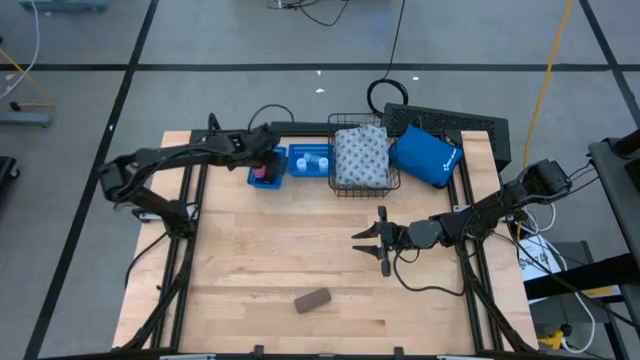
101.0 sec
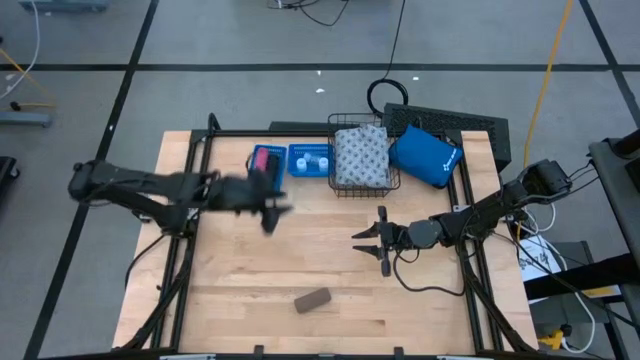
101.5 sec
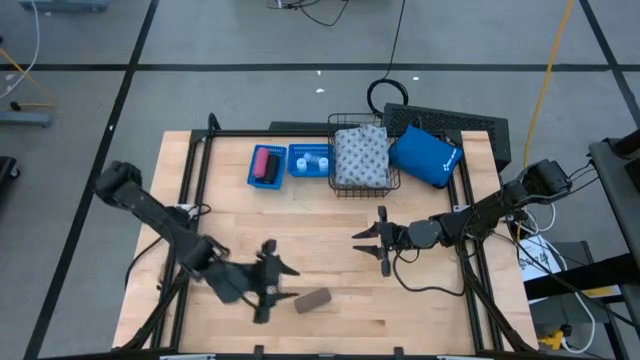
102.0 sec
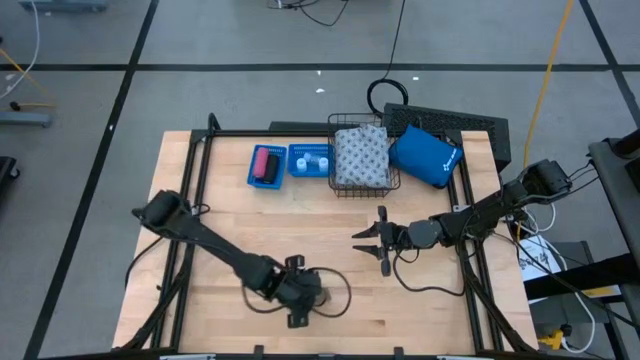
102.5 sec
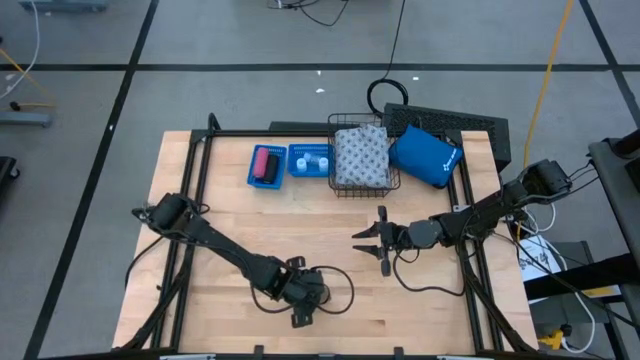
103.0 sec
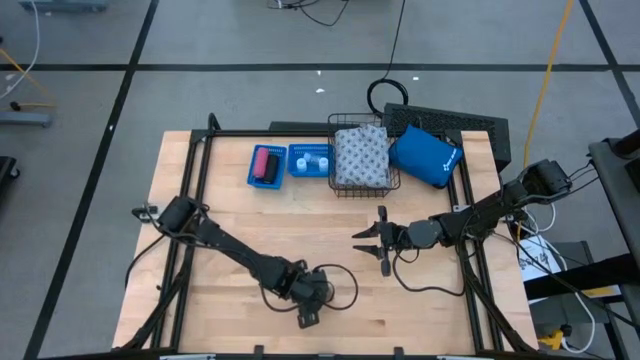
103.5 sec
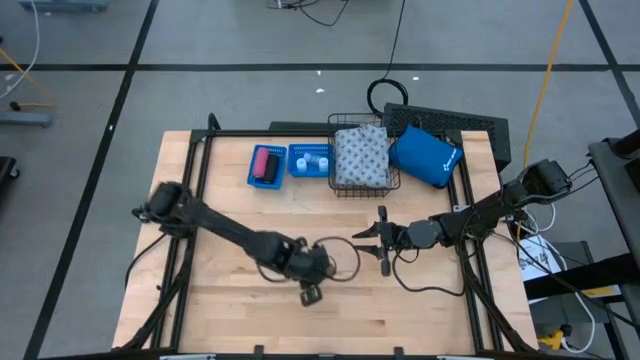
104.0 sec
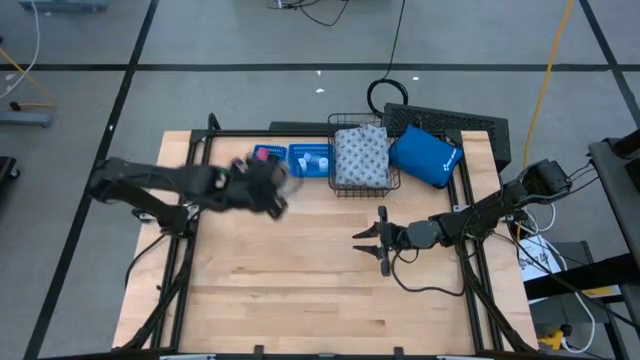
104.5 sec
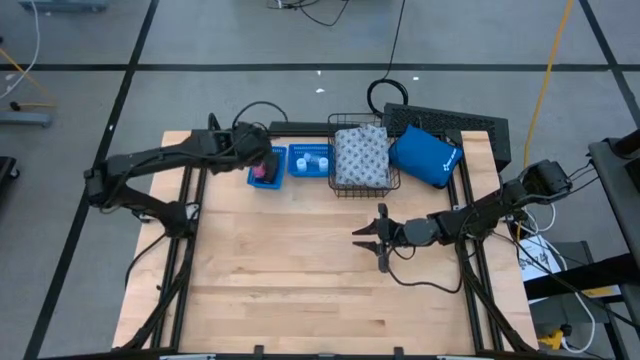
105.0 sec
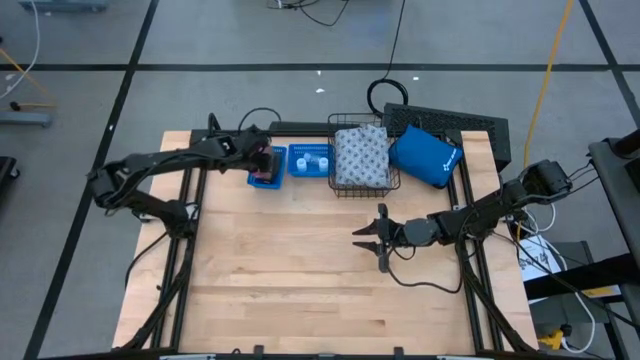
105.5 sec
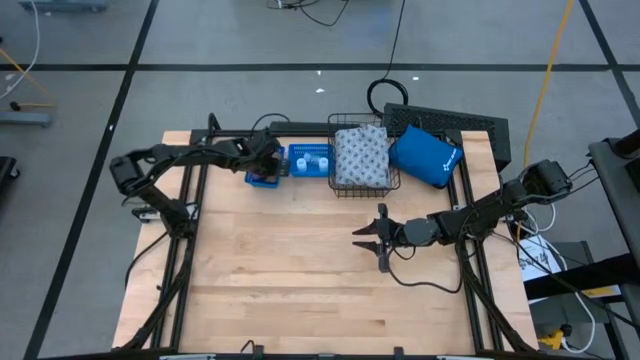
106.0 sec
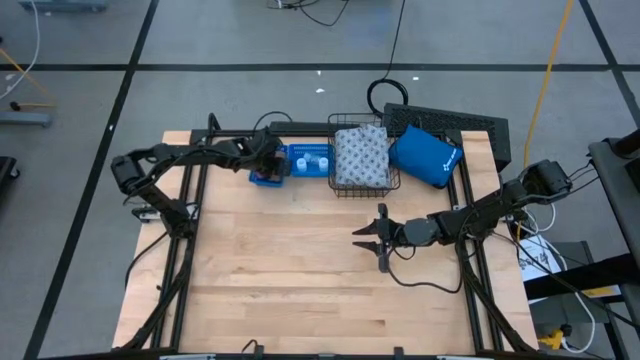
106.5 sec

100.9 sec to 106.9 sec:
Task: Pick & Place Medicine items
Put the brown bandage into the left blue bin

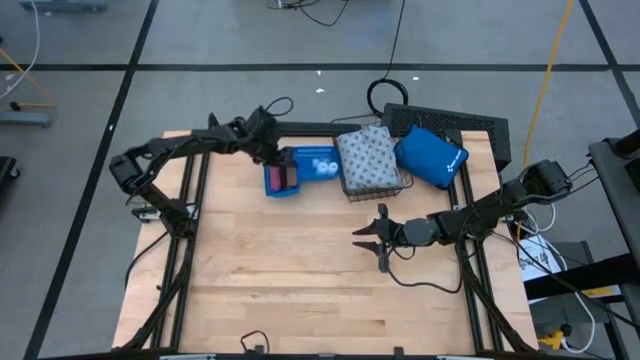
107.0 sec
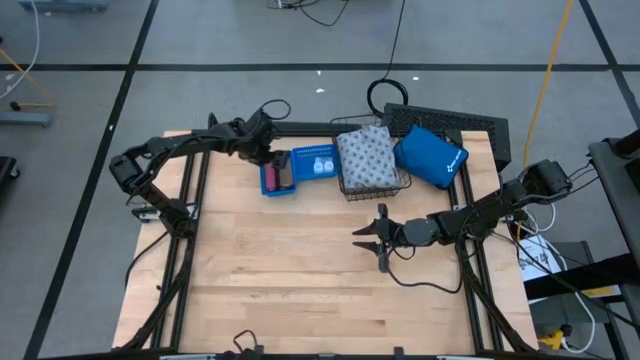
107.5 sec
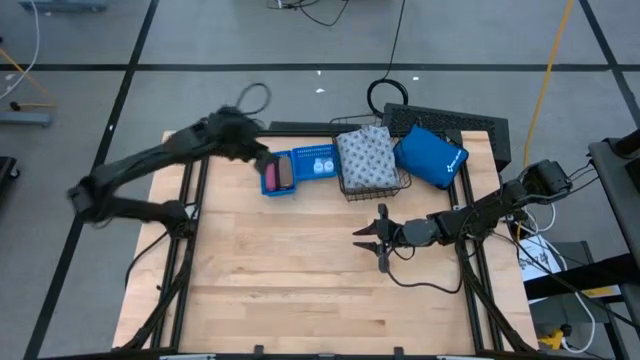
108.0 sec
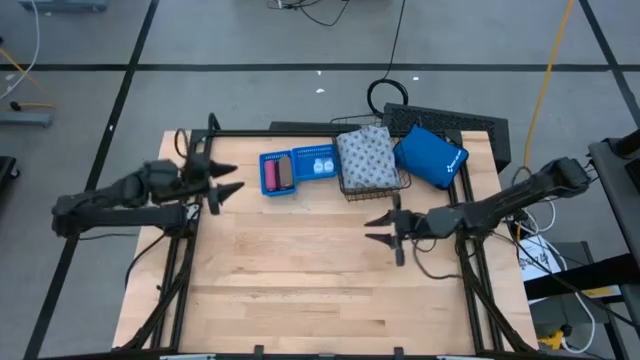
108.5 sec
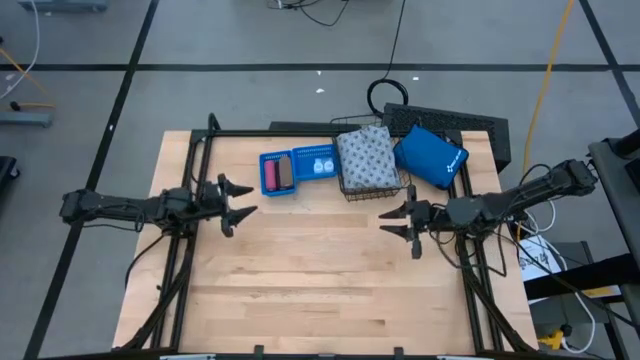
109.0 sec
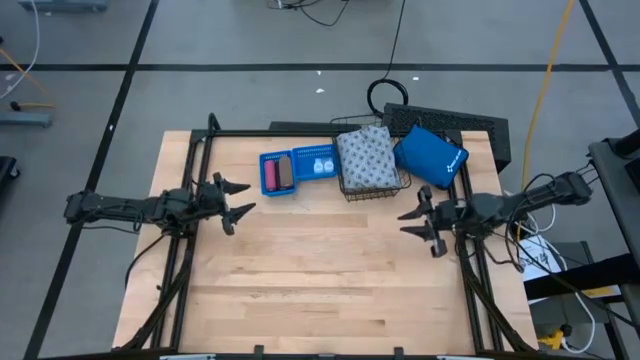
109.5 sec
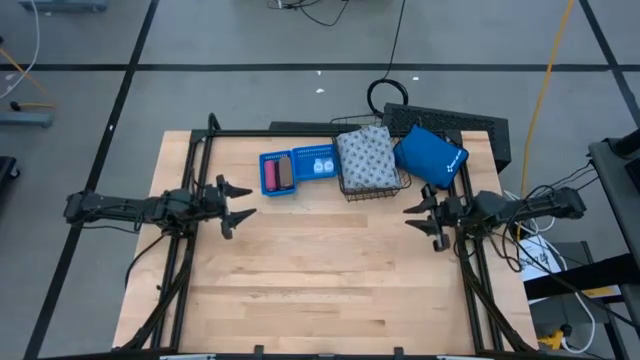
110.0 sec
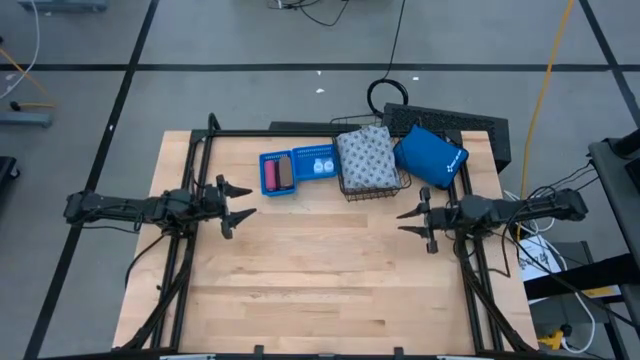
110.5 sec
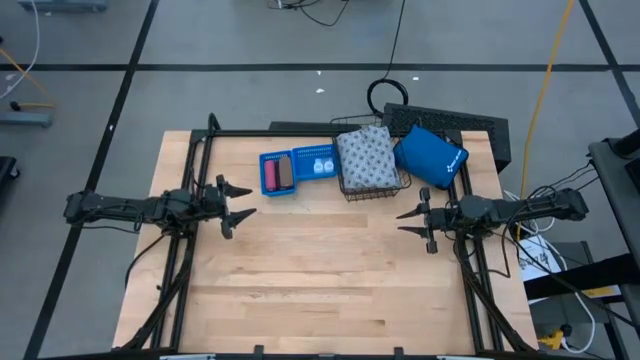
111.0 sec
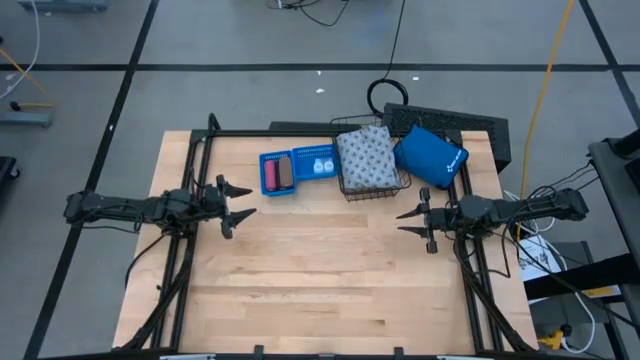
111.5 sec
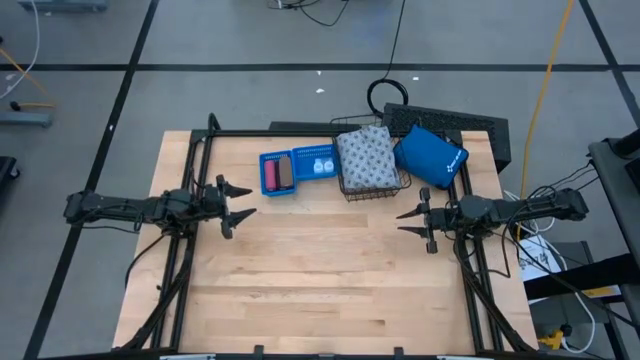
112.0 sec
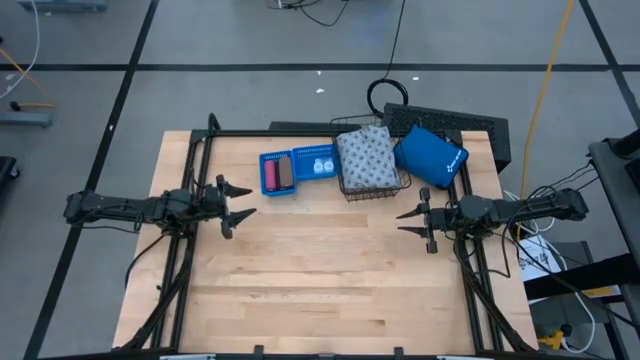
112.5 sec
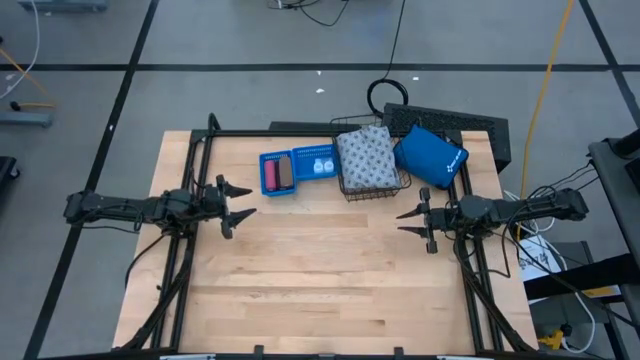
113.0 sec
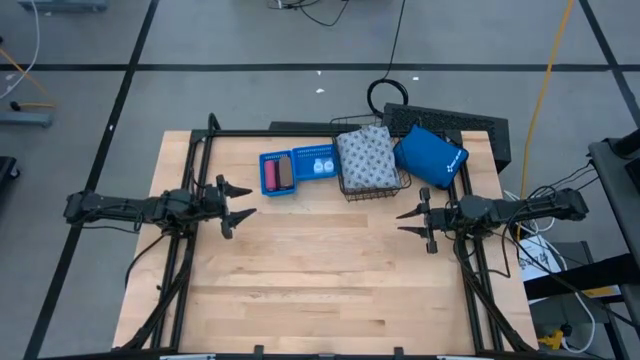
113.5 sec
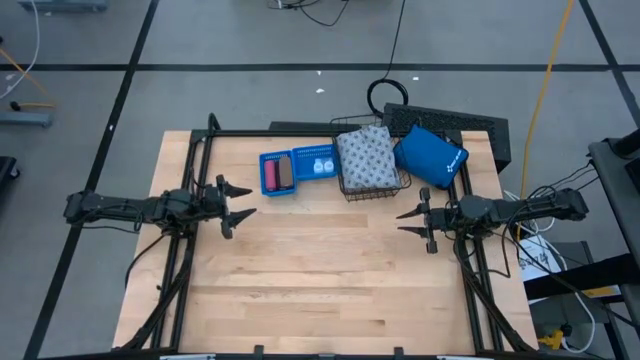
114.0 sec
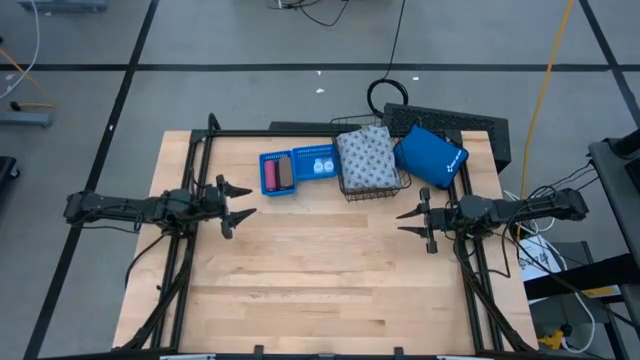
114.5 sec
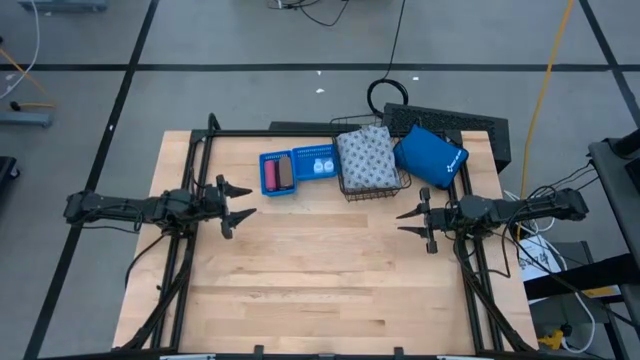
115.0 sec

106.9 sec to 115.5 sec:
Return to Home Position

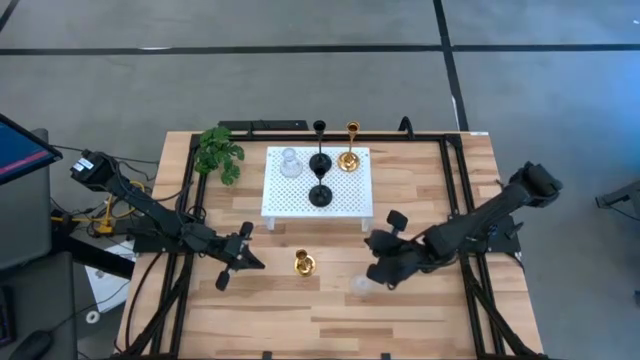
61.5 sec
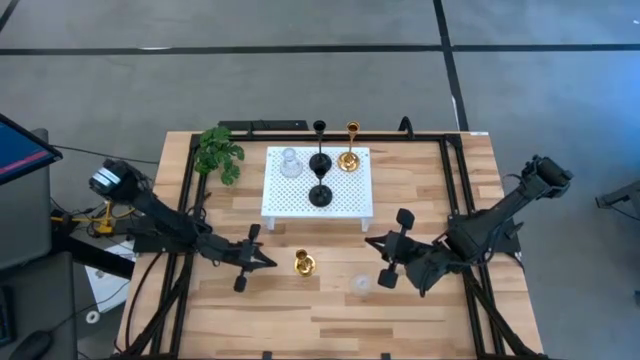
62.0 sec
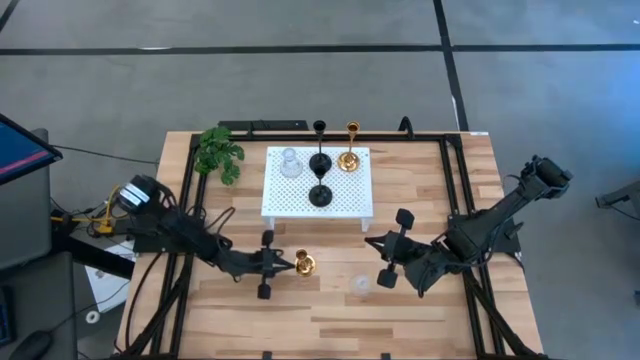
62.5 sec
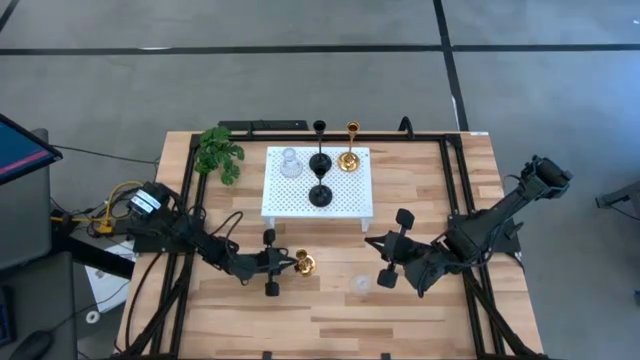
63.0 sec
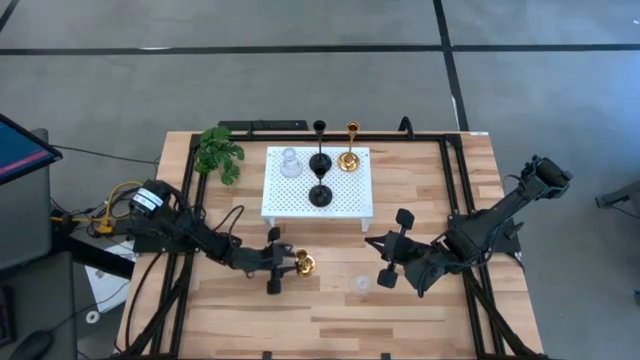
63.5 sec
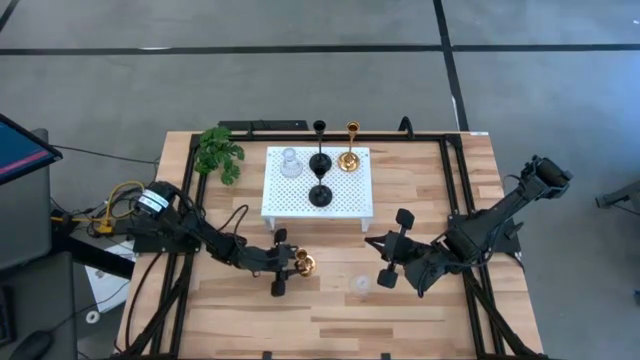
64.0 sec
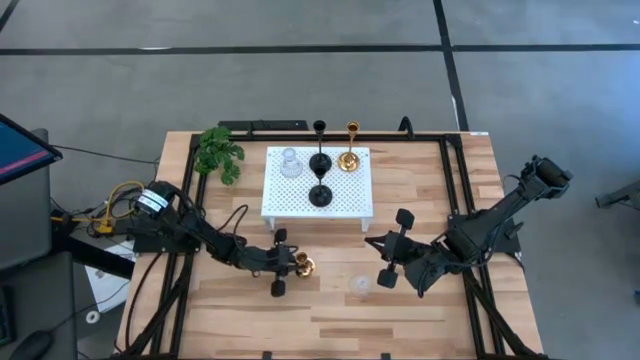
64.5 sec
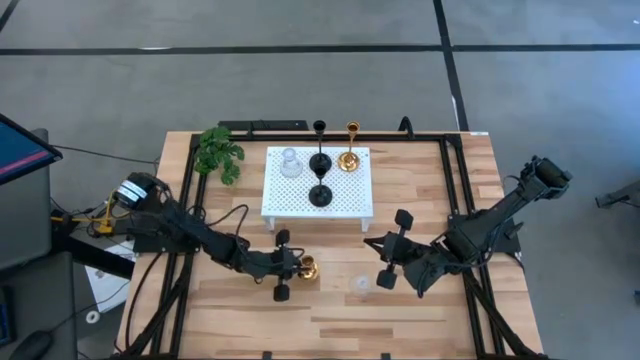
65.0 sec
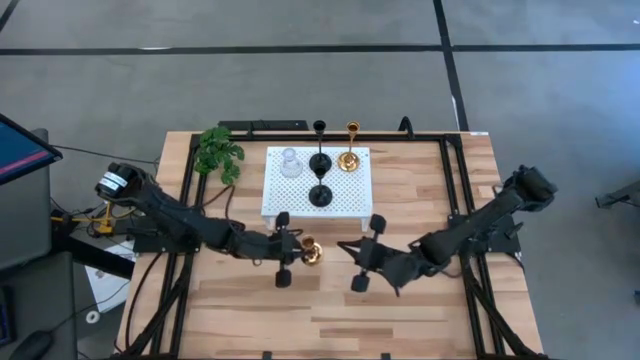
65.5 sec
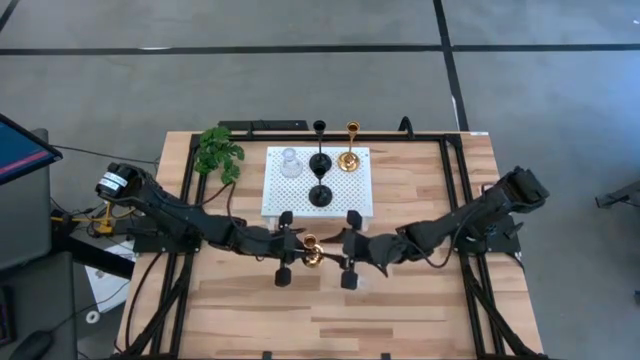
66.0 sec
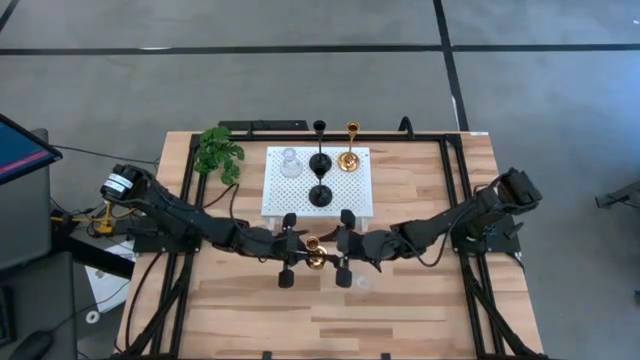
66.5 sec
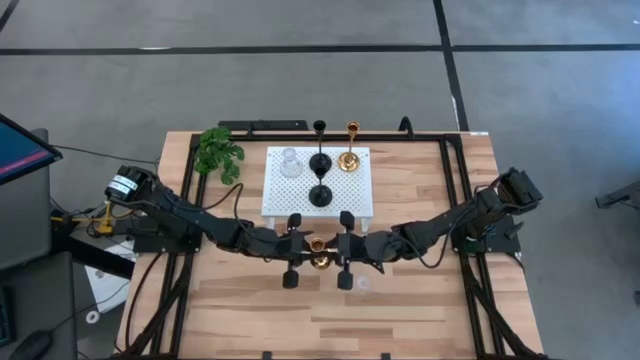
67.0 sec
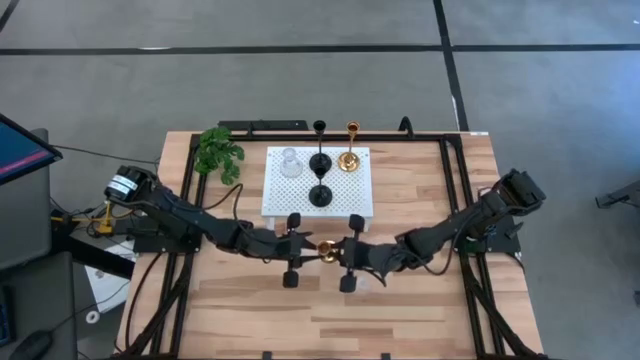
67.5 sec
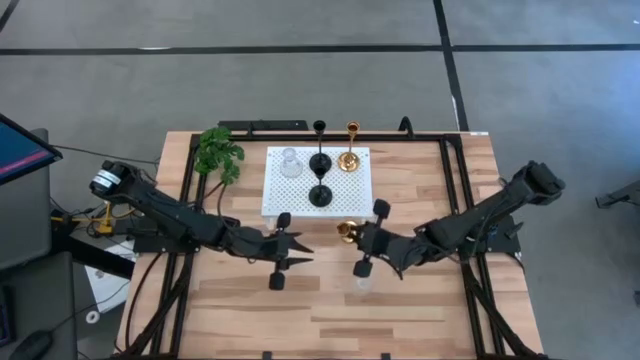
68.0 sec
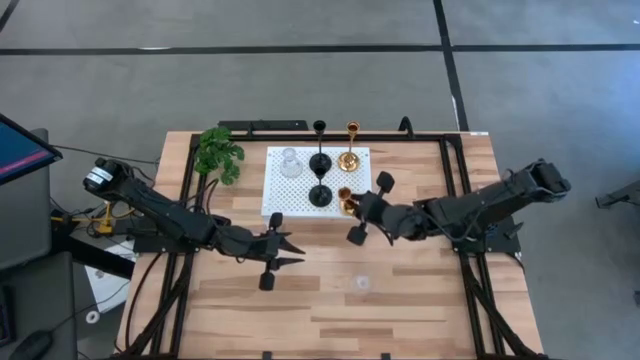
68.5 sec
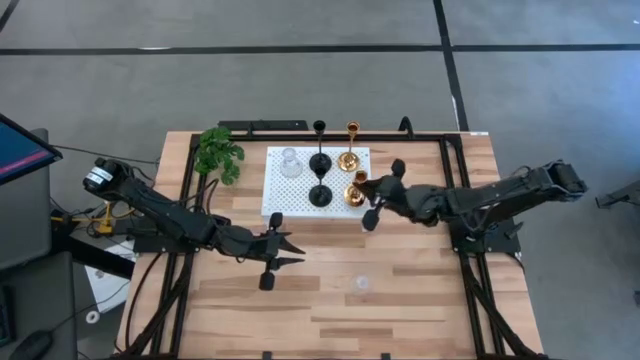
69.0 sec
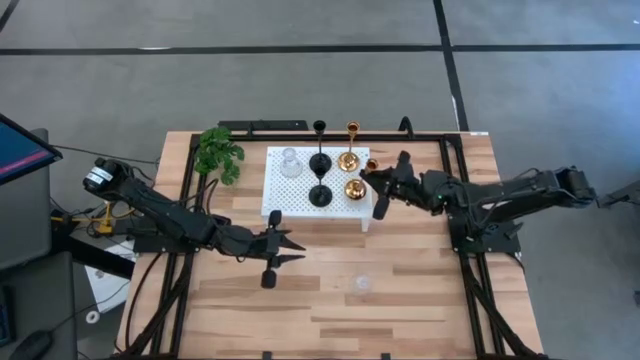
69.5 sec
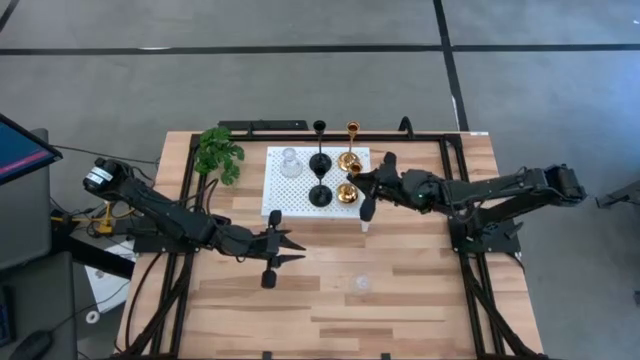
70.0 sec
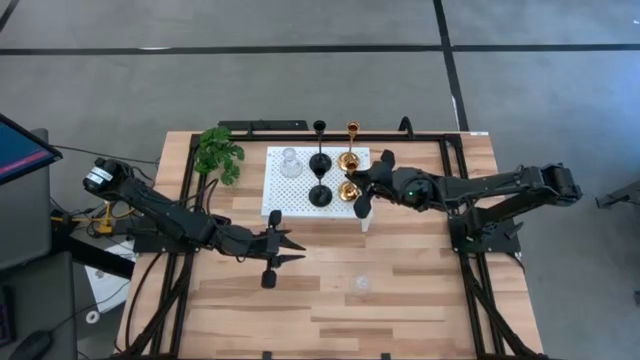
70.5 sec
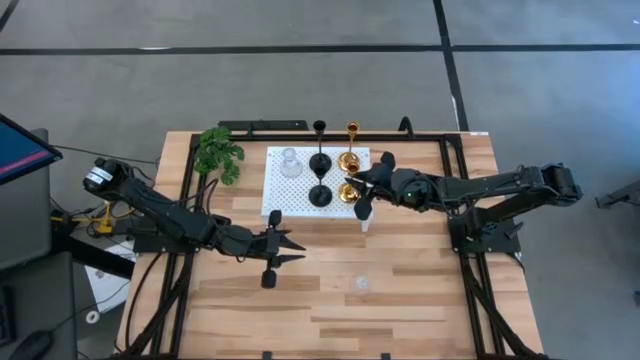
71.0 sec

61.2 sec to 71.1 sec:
Task: Pick & Place candle stick holders
Put the gold candle holder aligned with the other gold candle holder on the shelf
